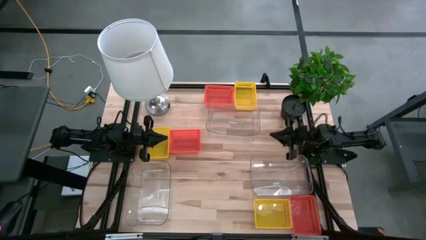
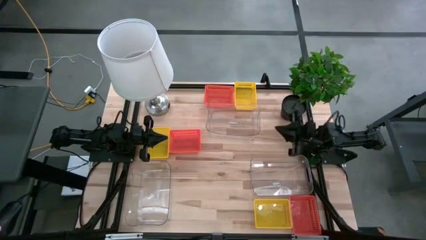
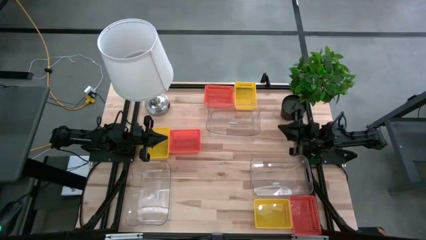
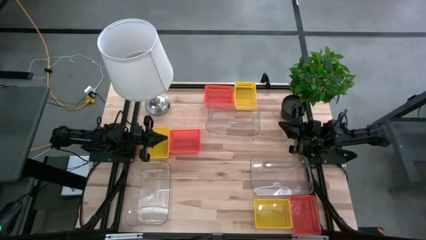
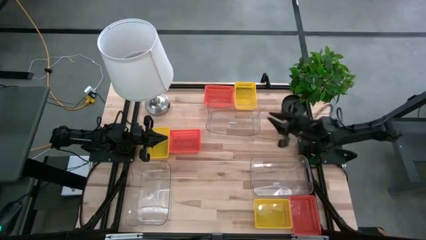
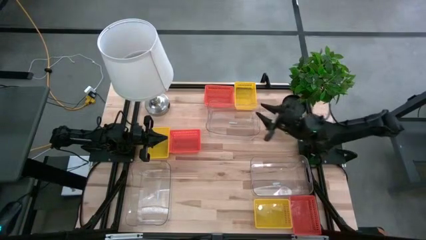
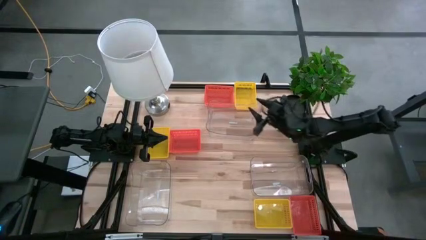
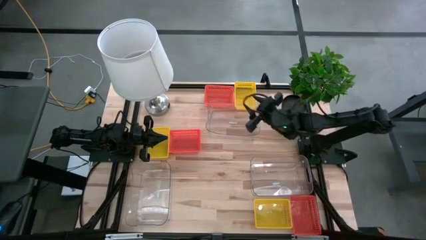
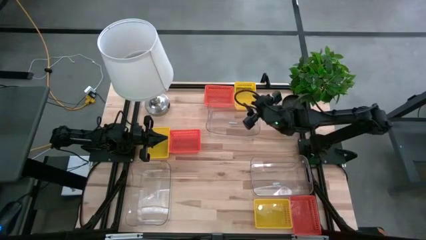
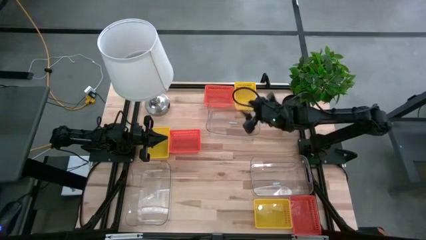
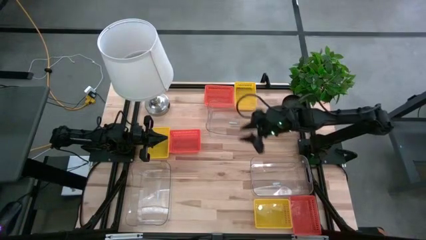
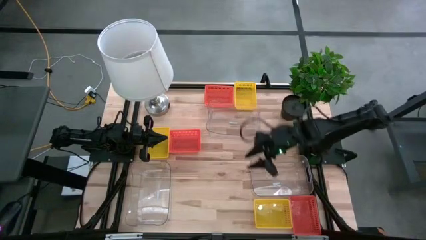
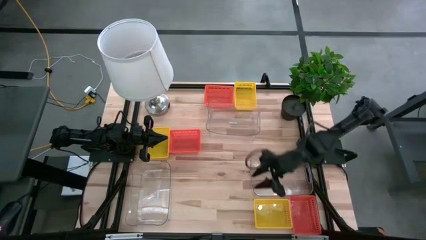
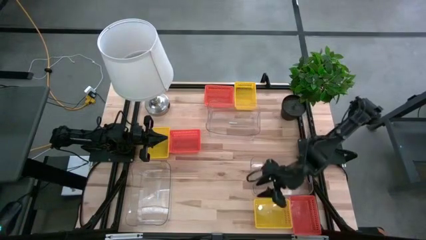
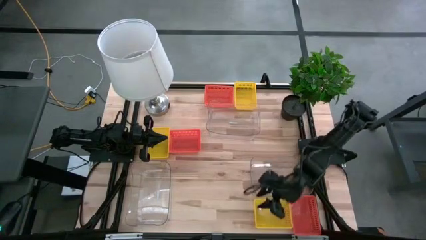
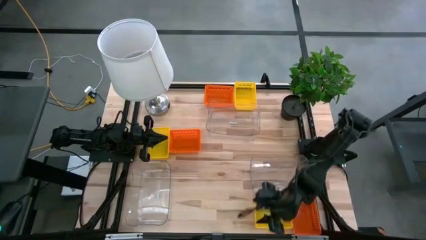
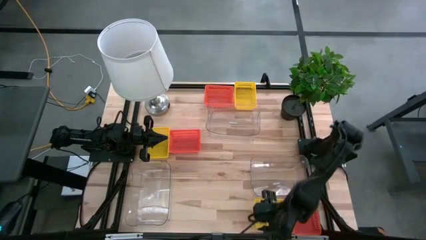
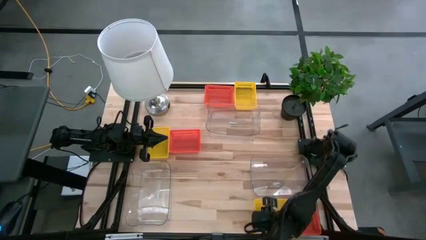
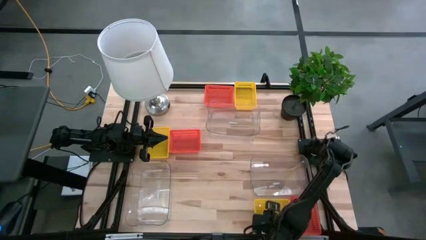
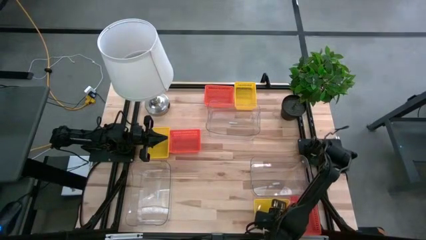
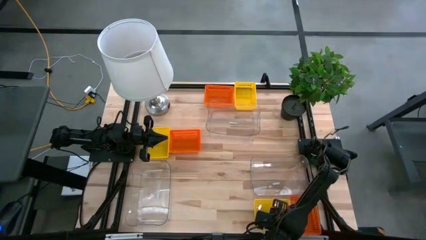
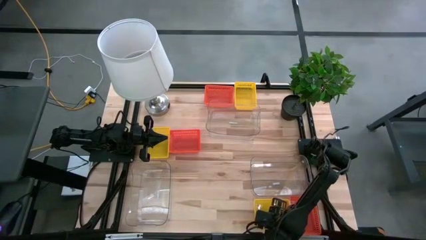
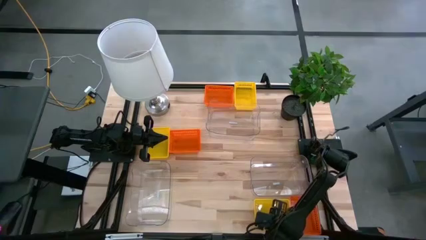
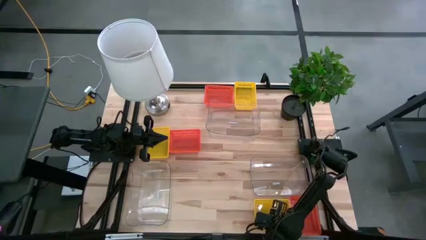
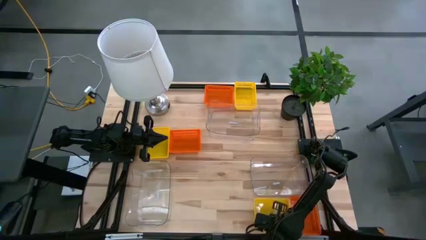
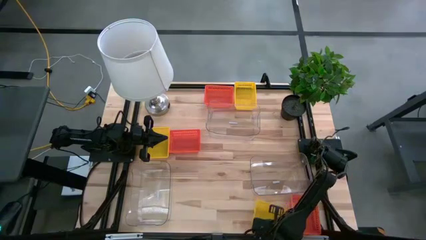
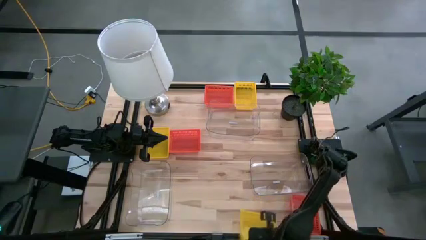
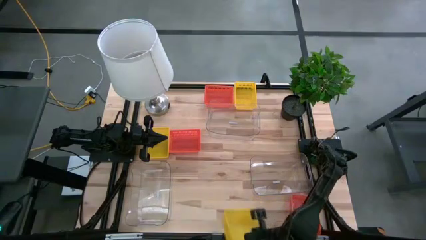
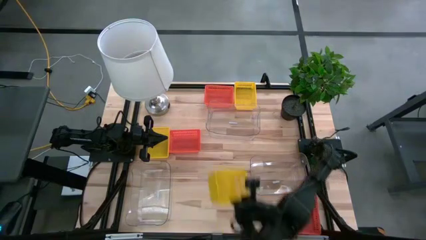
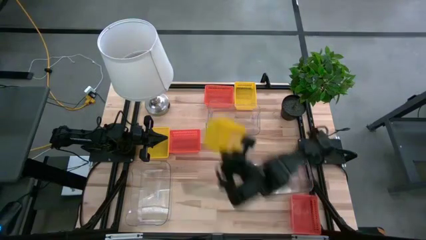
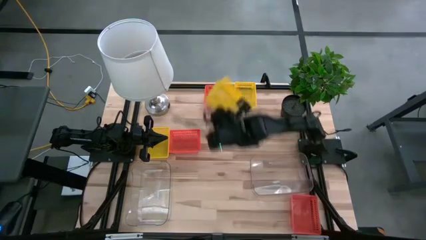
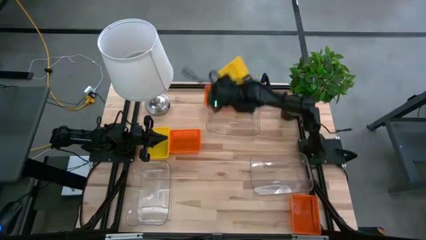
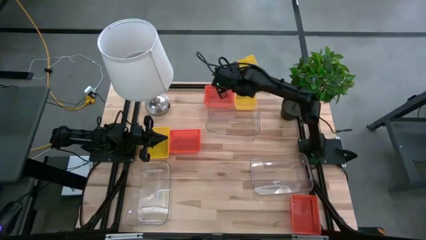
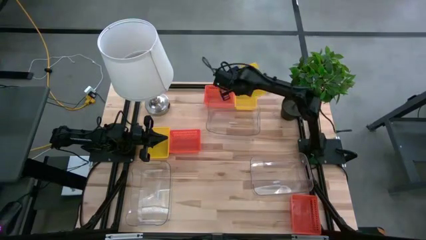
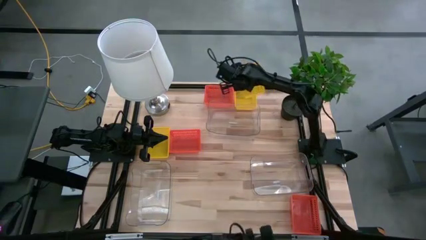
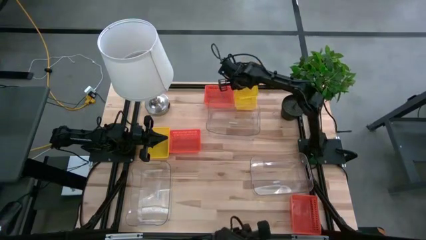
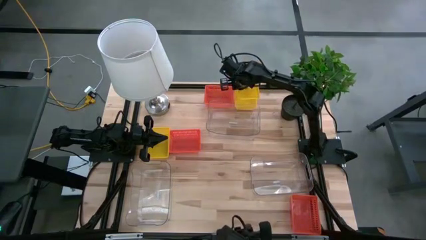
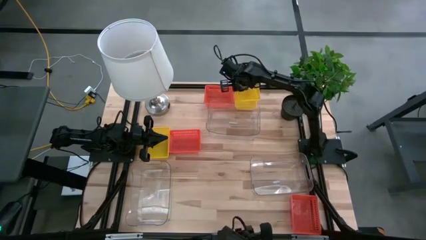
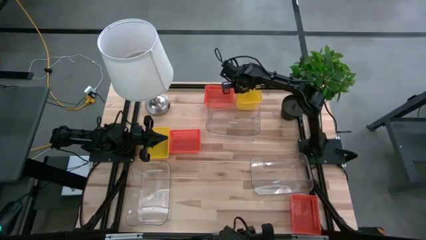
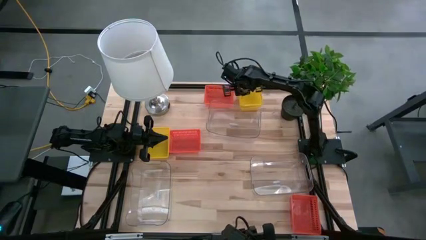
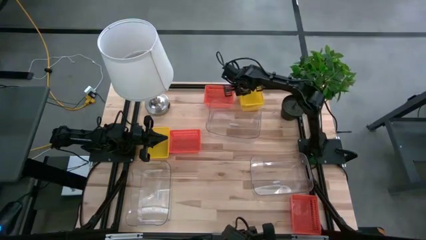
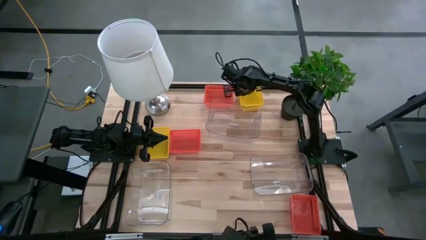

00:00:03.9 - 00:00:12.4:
Stack the bottom yellow bin on the top yellow bin

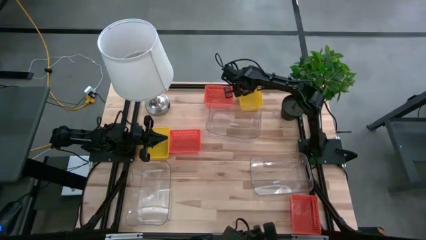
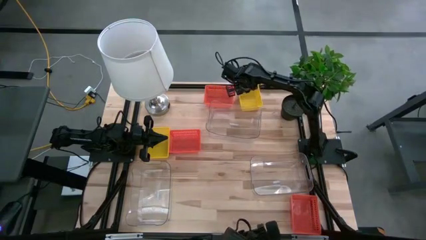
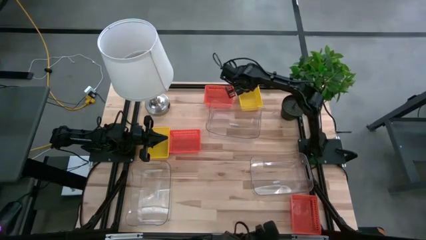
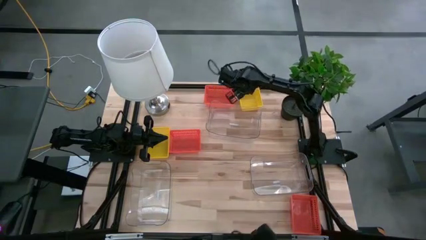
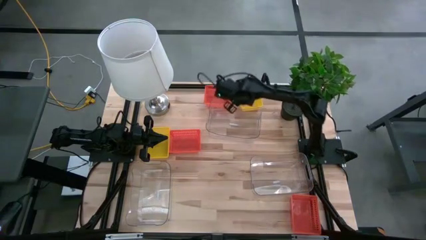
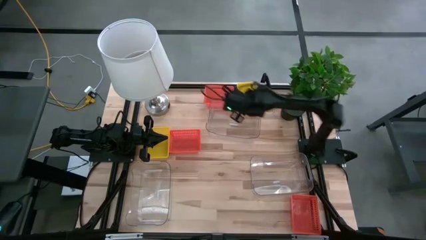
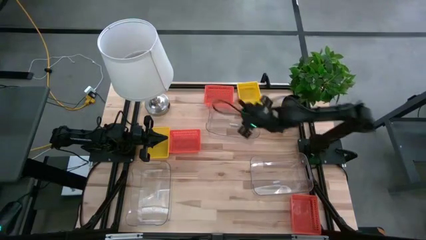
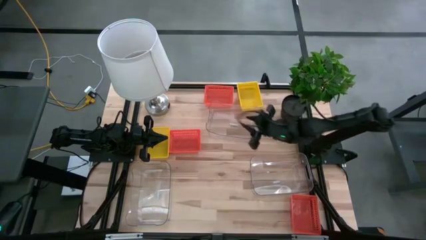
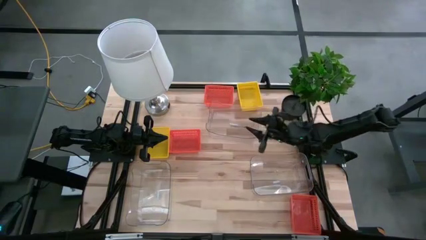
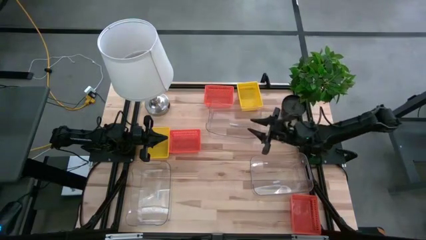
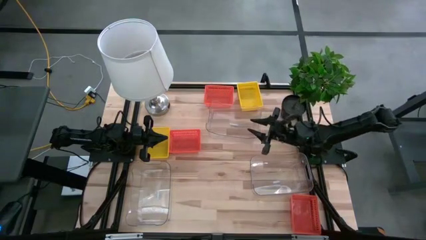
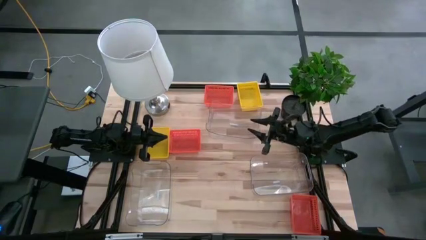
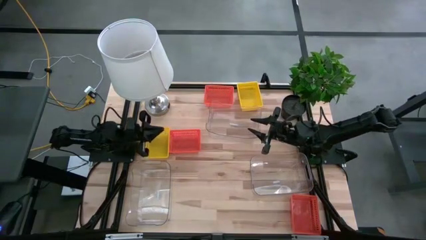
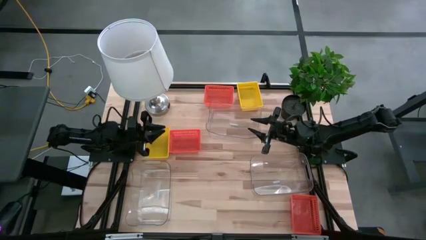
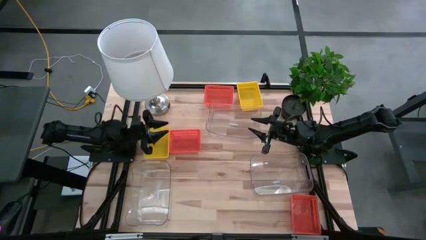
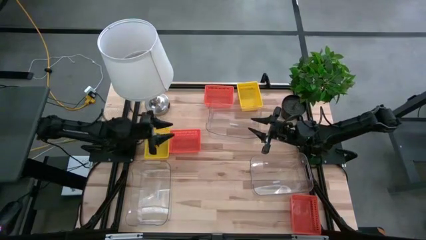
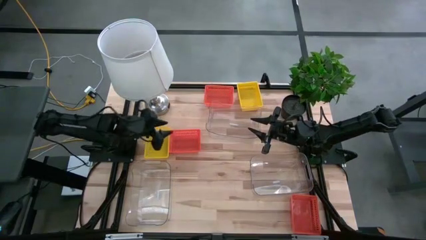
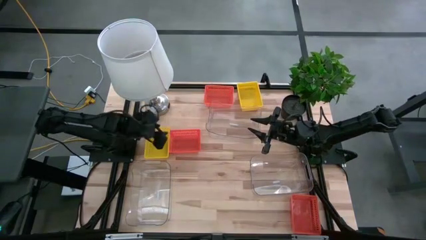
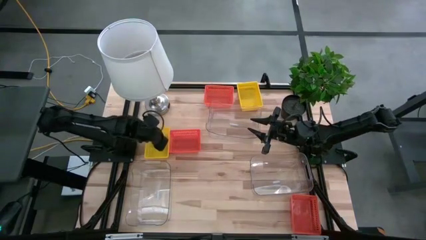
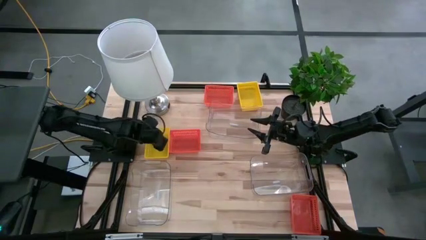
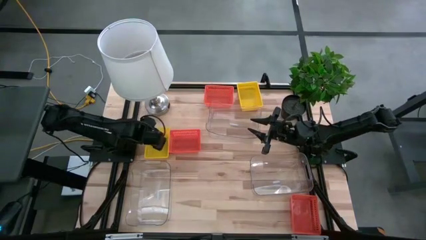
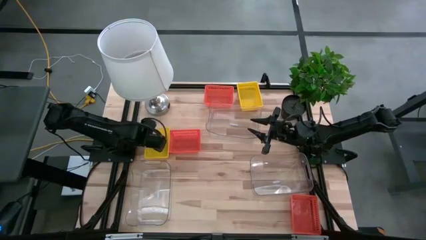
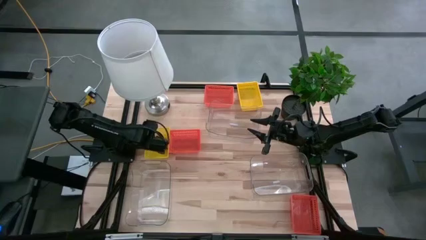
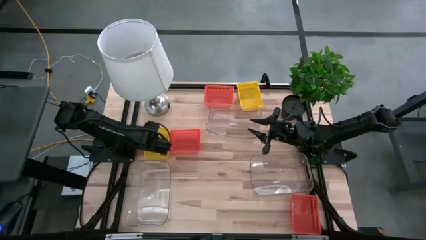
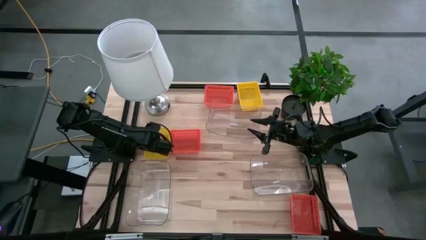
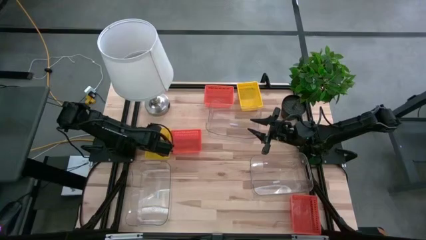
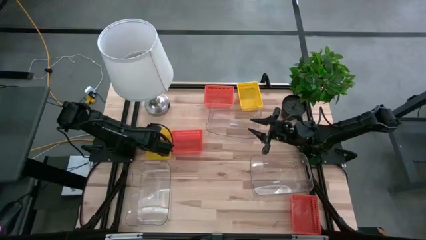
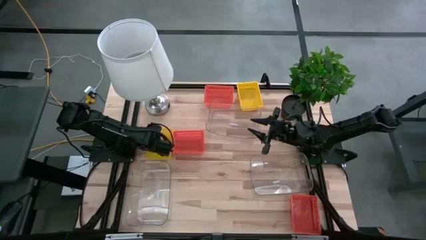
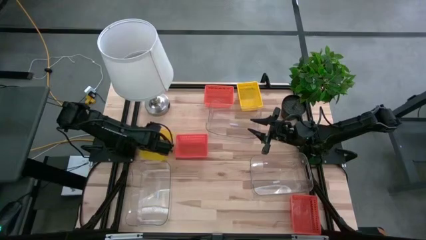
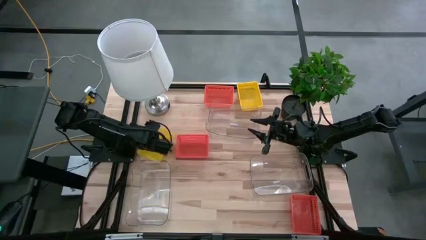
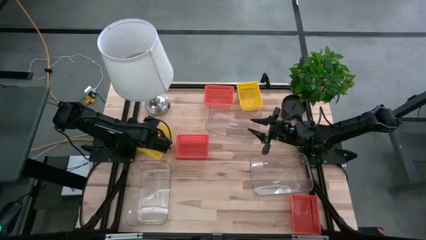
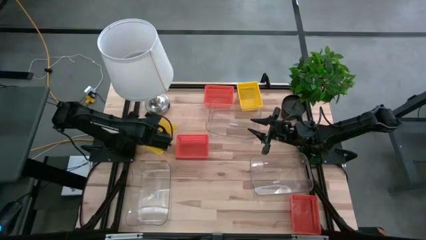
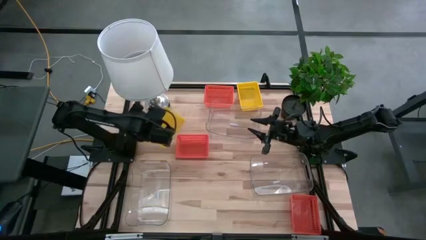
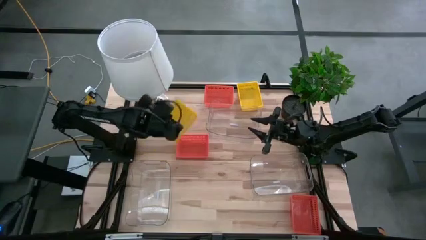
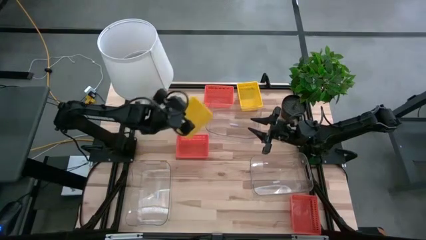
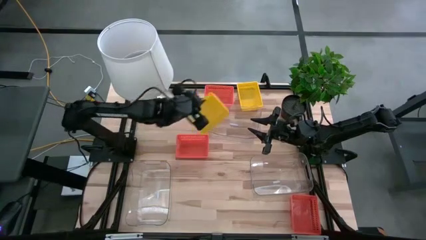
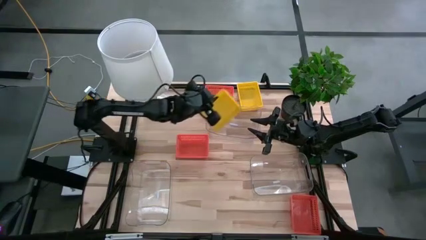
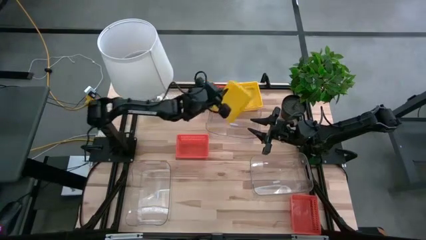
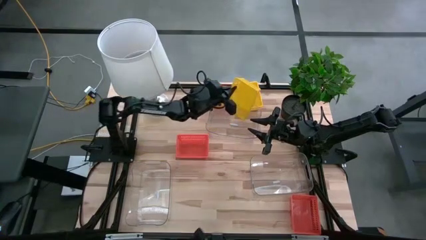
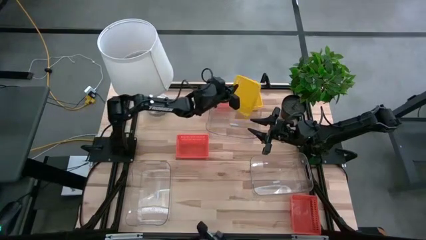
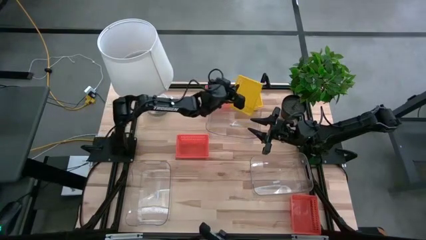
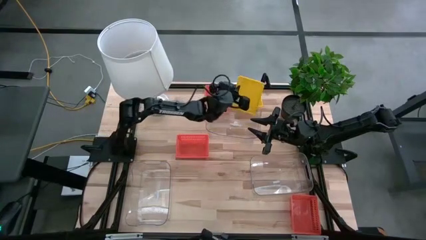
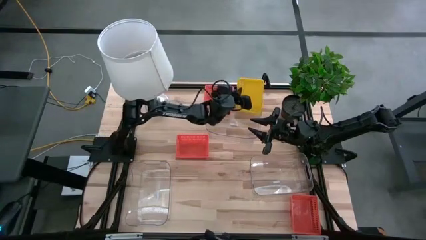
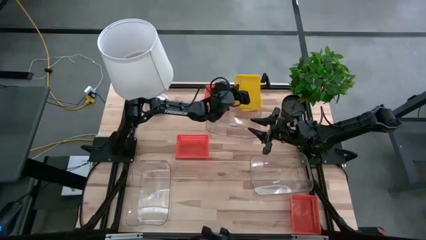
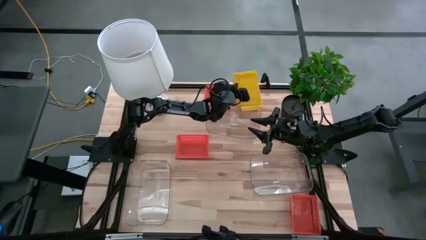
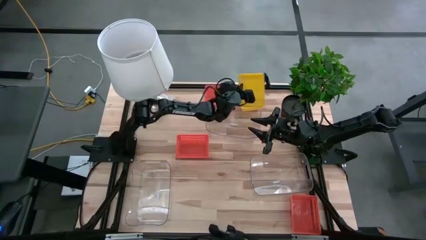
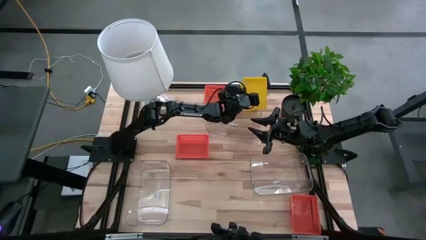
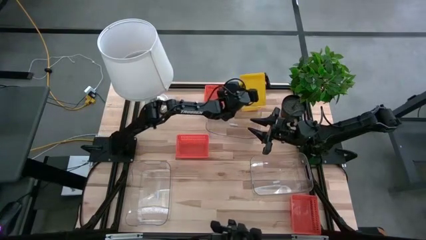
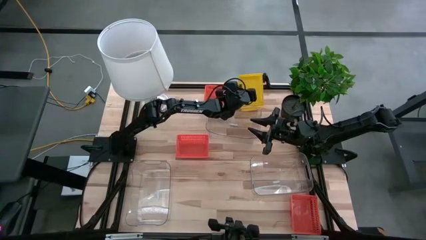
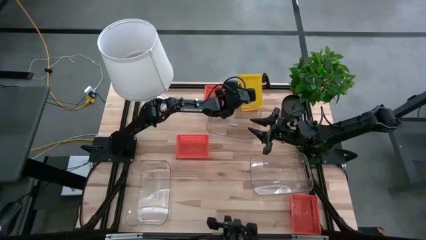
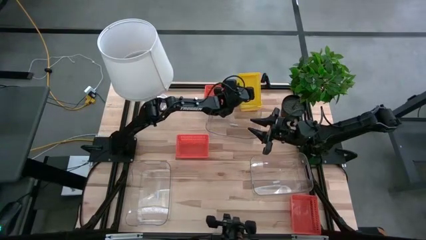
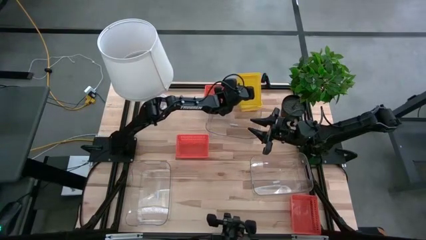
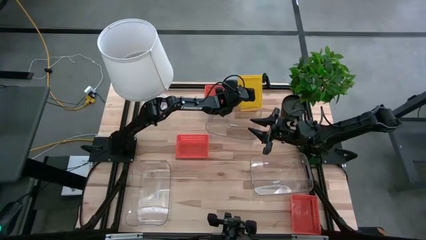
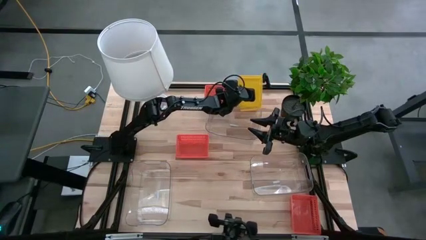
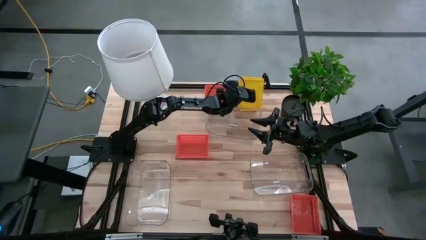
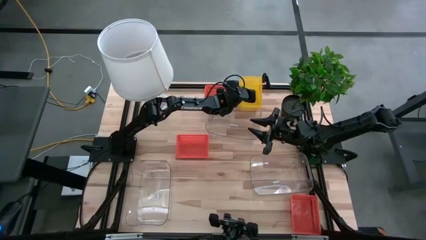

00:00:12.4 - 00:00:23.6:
Stack the bottom yellow bin on the top yellow bins
